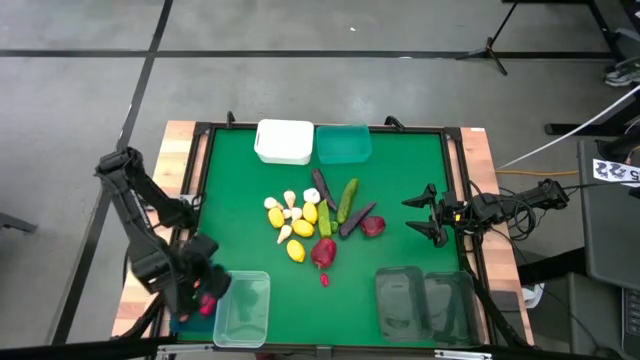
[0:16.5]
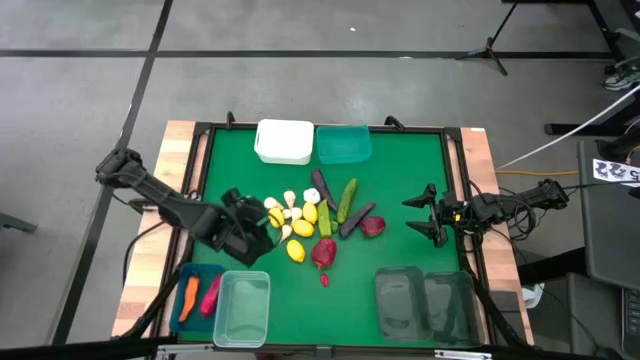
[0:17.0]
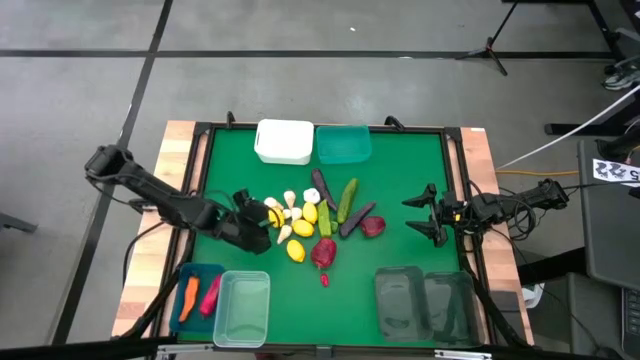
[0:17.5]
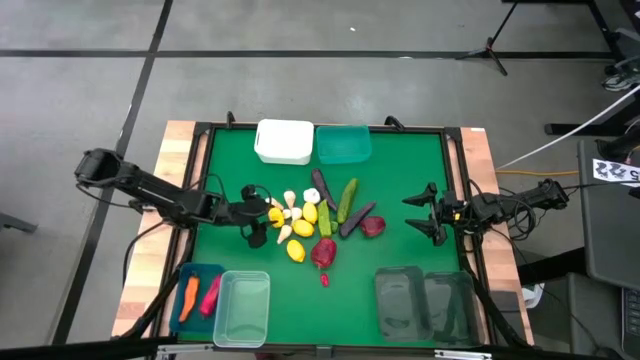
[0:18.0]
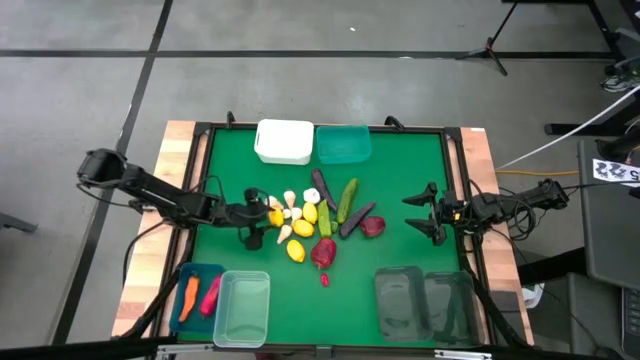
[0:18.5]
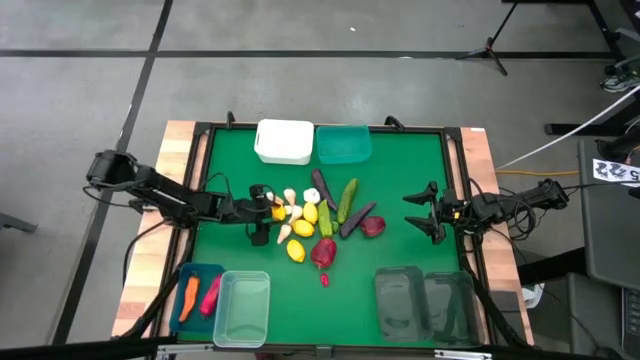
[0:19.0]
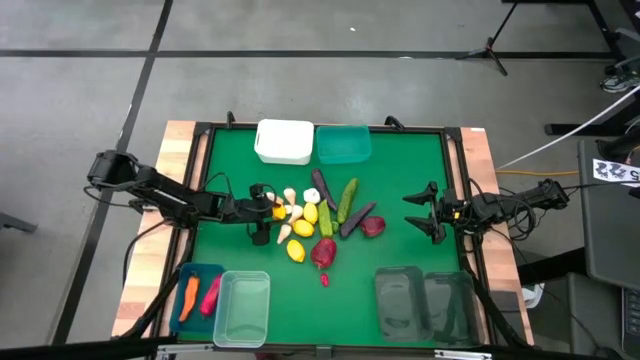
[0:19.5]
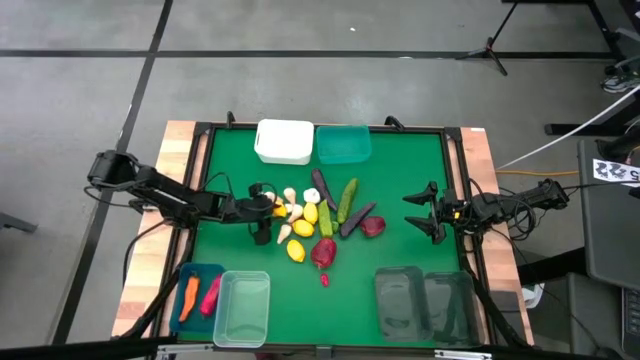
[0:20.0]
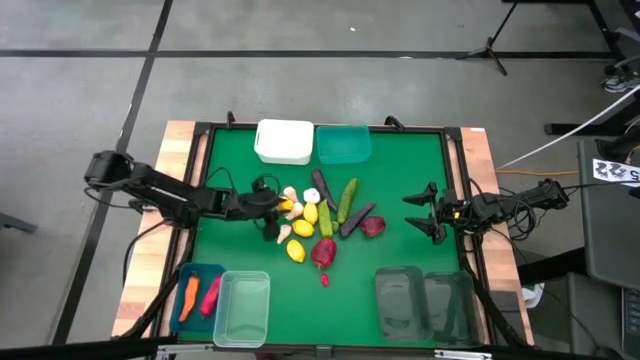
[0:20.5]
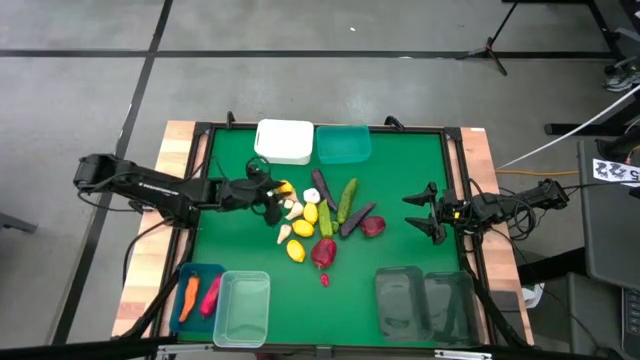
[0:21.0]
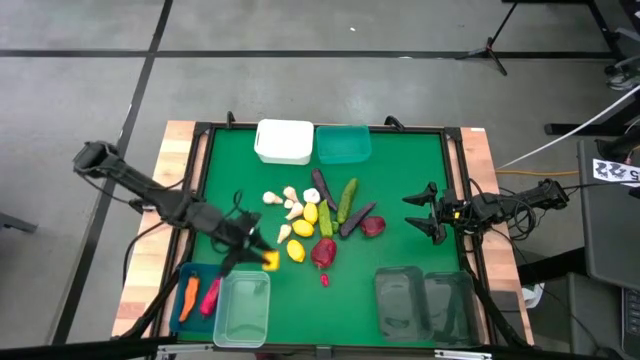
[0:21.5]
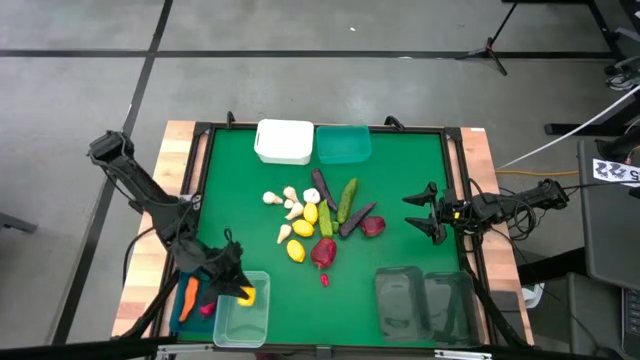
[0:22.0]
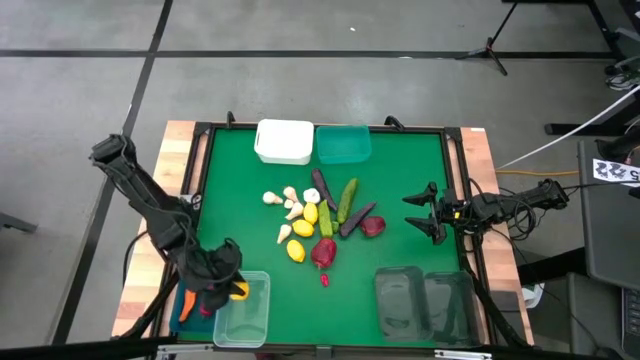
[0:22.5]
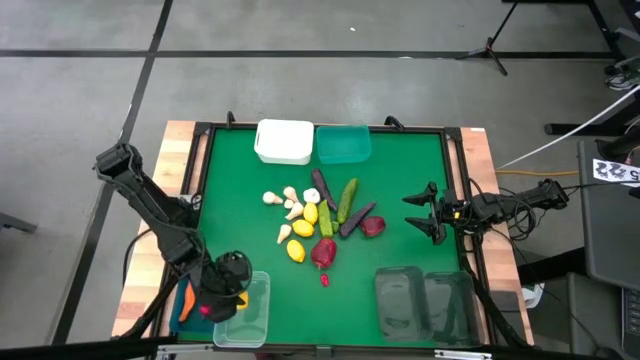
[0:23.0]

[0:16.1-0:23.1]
Task: Sort produce into baskets
Put the lemon into the transparent bin

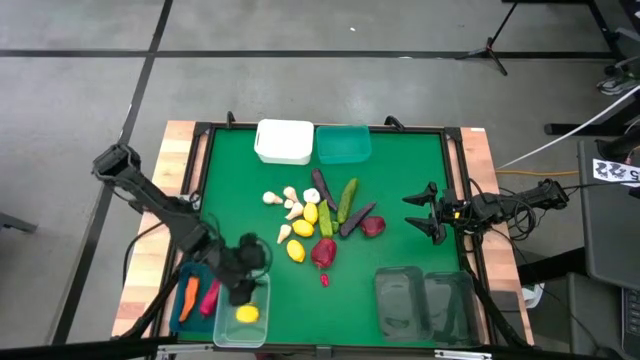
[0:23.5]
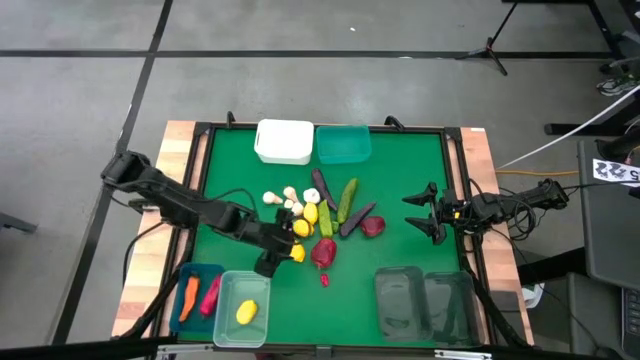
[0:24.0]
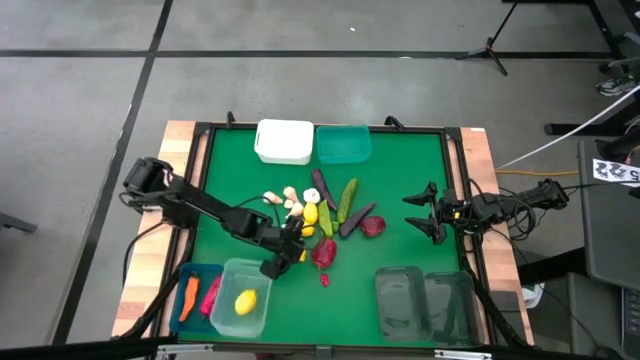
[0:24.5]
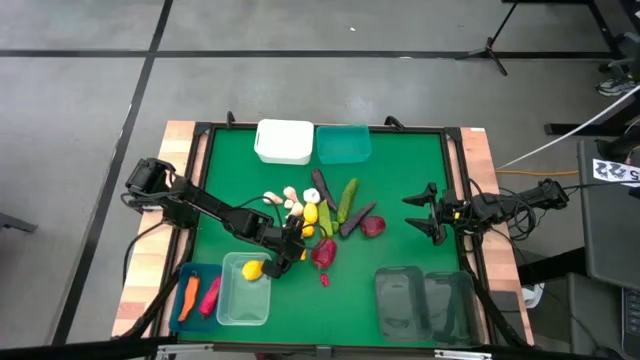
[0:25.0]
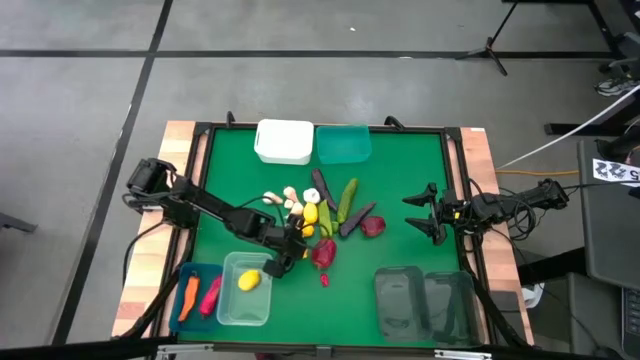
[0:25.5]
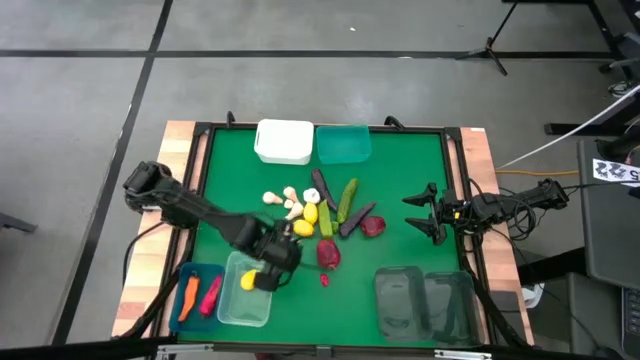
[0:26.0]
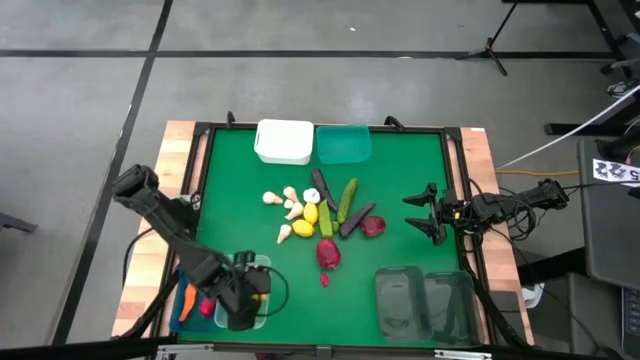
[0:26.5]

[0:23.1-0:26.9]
Put the lemon into the transparent bin

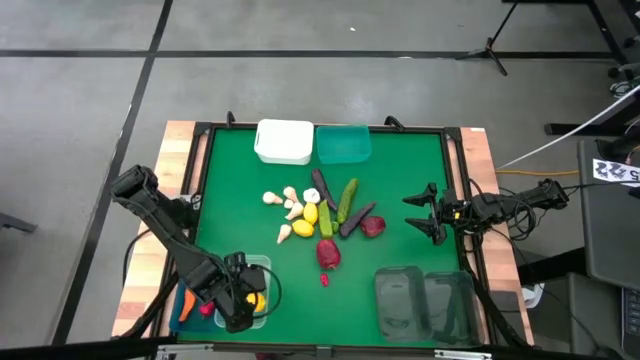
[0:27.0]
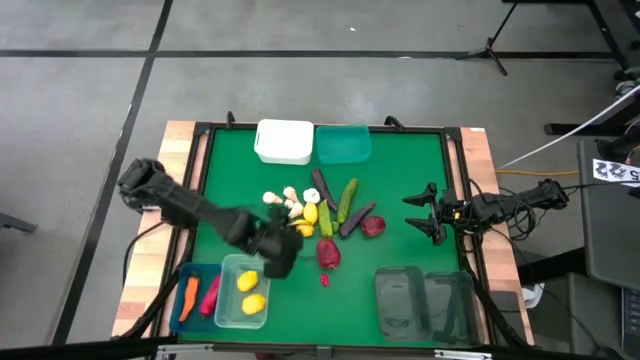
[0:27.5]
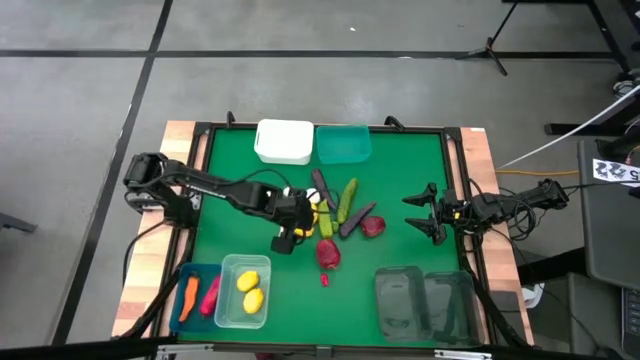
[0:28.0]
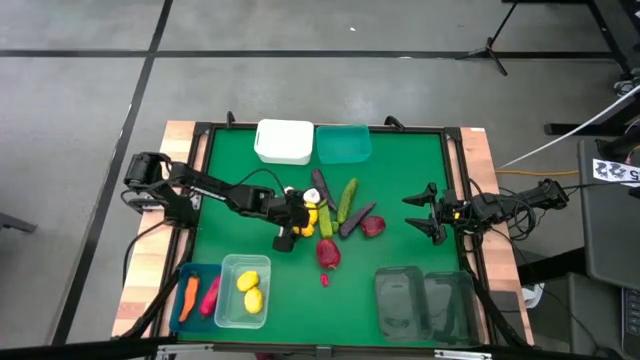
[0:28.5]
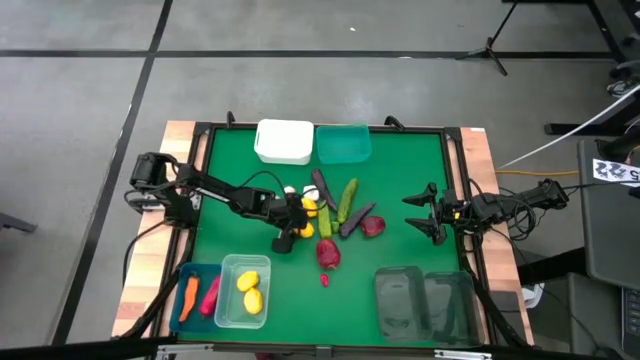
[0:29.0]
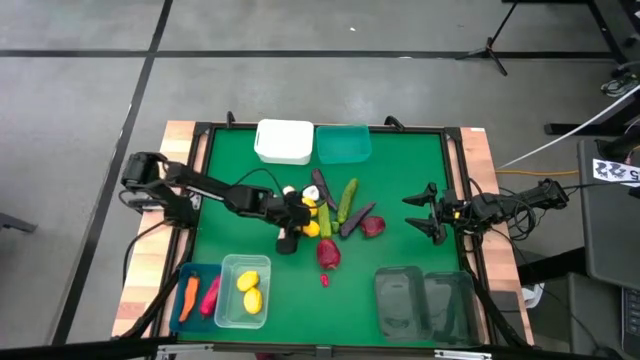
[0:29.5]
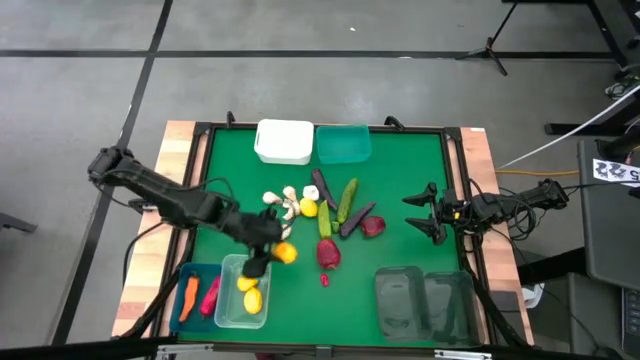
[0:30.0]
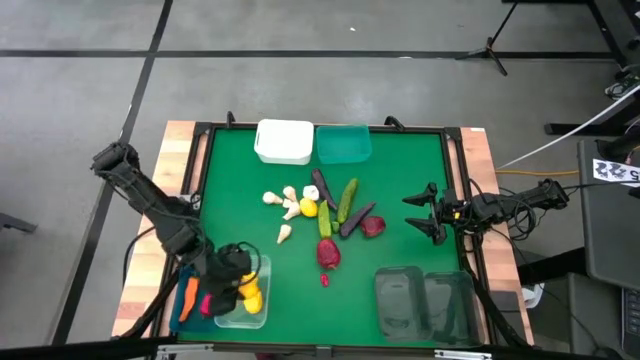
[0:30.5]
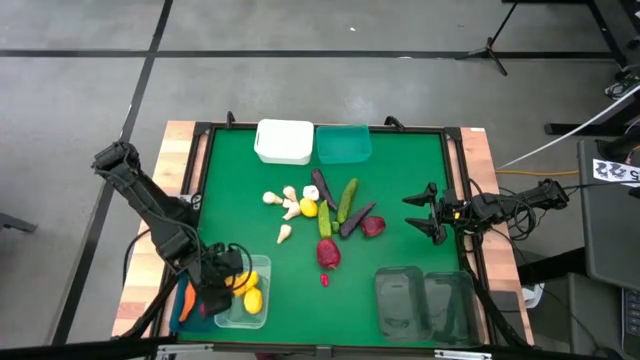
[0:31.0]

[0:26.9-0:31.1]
Put the lemon into the transparent bin

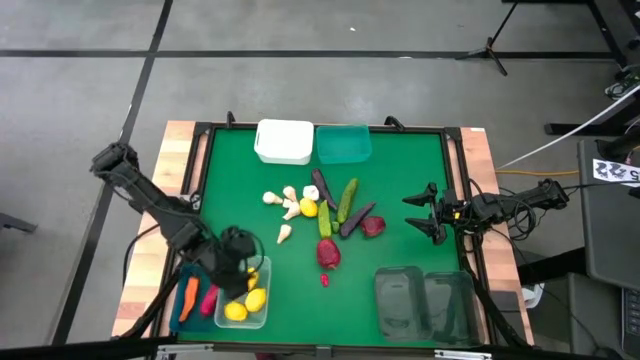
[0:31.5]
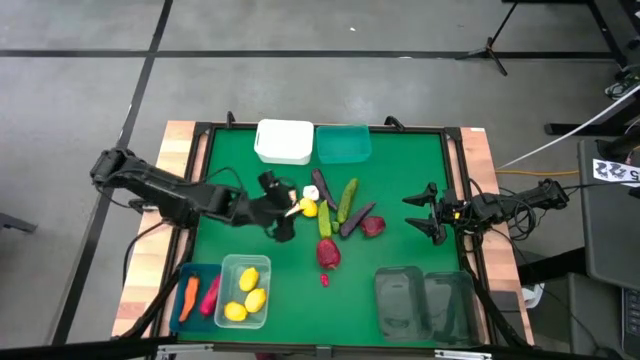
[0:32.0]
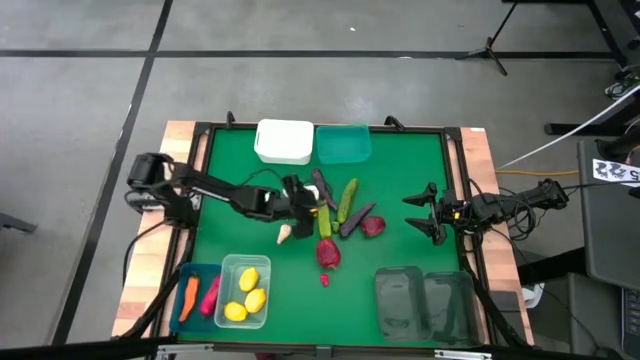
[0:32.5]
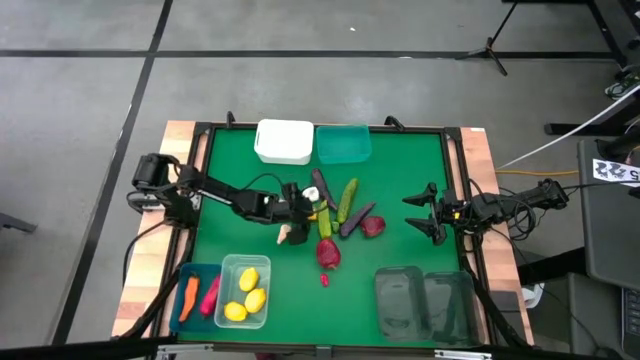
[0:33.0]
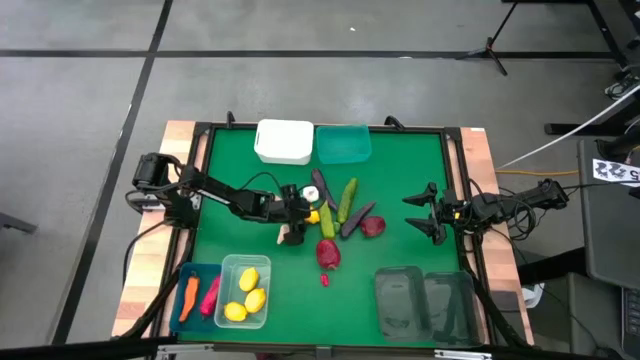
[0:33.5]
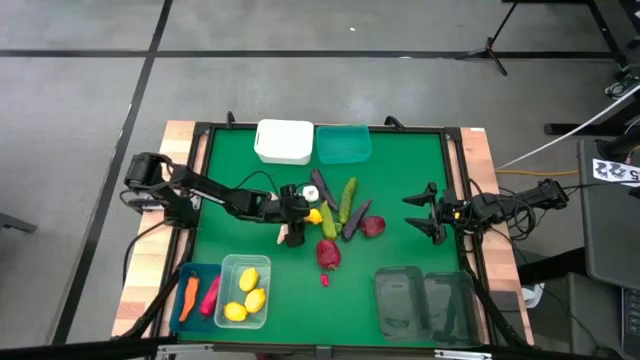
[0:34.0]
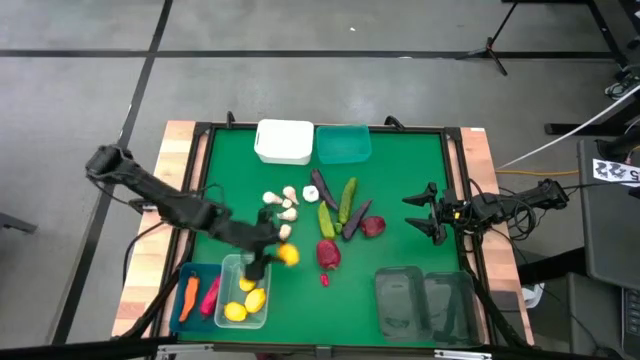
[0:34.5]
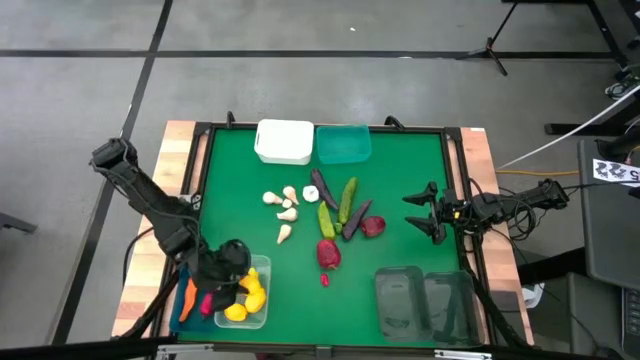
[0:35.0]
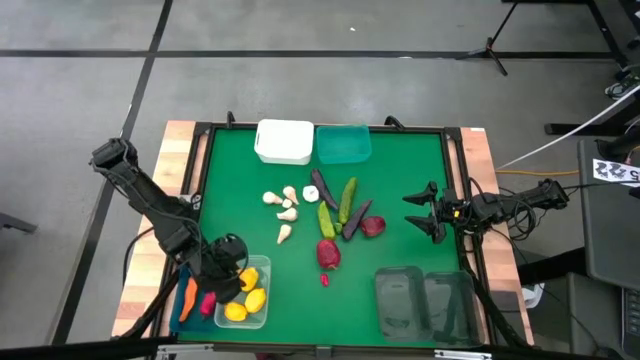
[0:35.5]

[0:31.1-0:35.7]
Put the lemon into the transparent bin

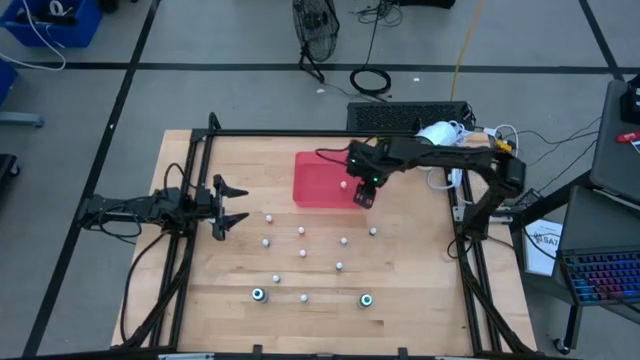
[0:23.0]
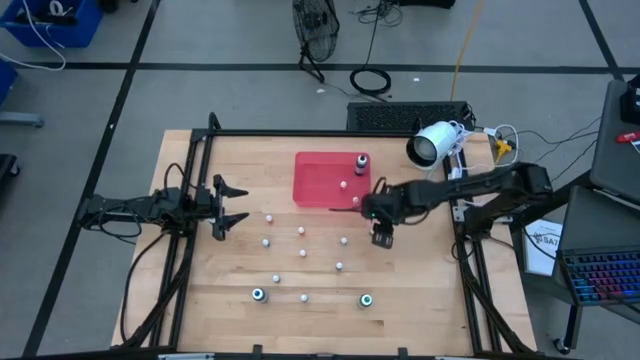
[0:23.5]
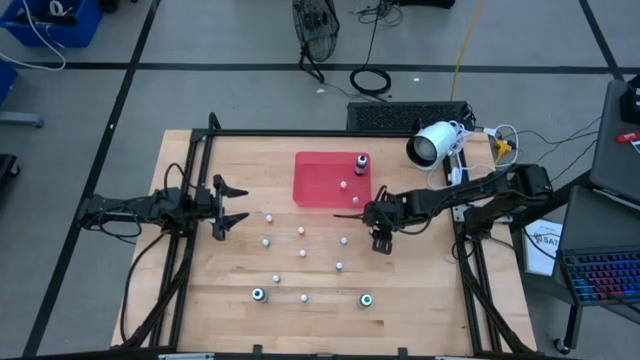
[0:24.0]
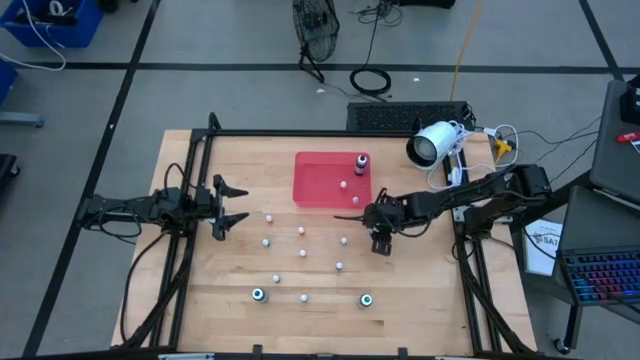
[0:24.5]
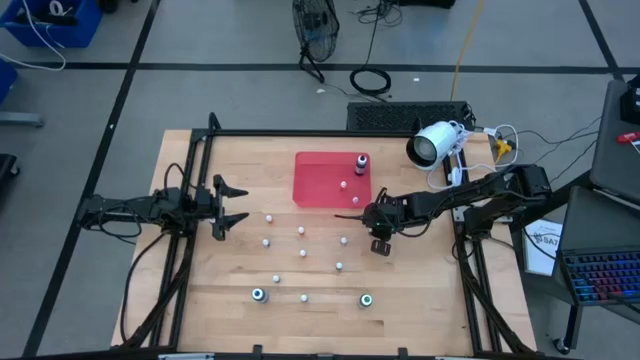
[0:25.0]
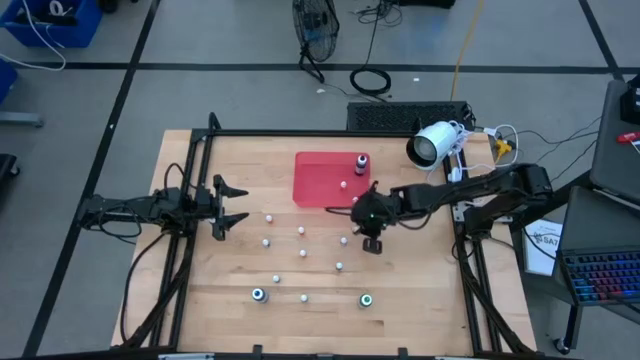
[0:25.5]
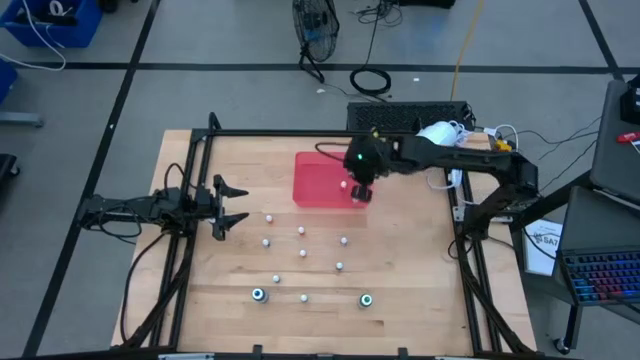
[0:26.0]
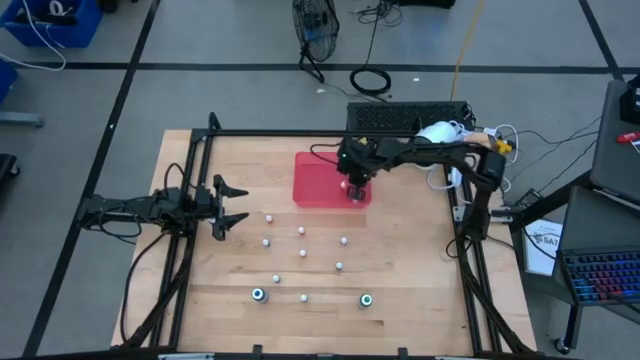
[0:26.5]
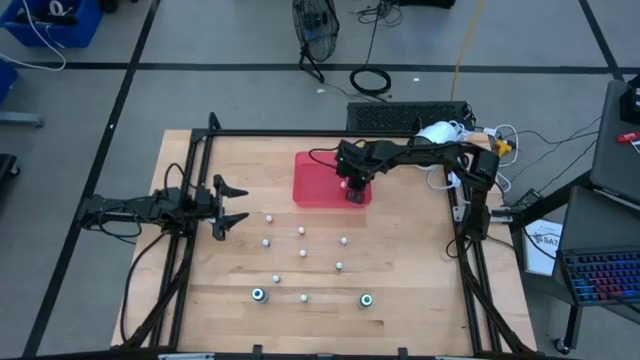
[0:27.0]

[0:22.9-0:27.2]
Task: Pick & Place food coloring
Put the small black food coloring bottle into the bin
